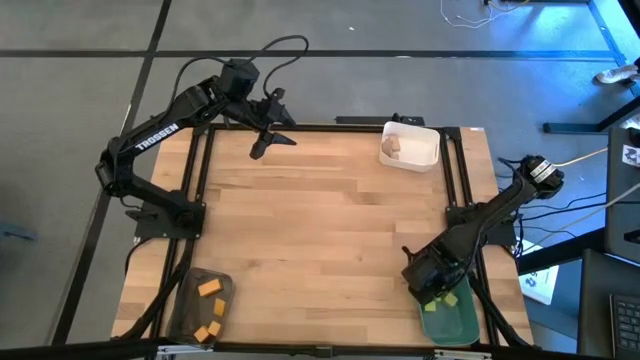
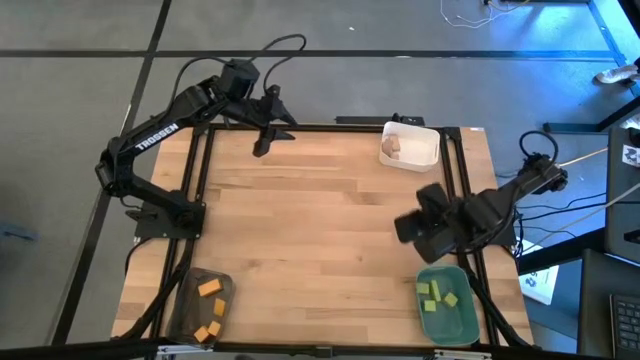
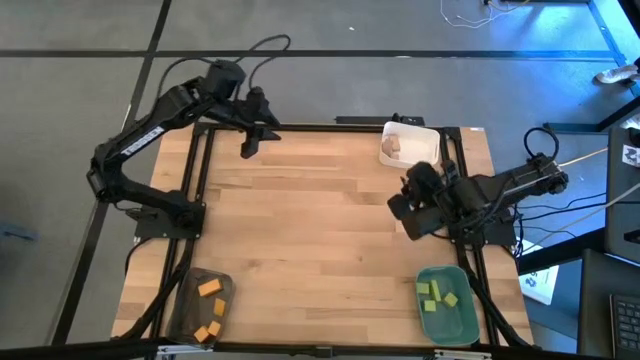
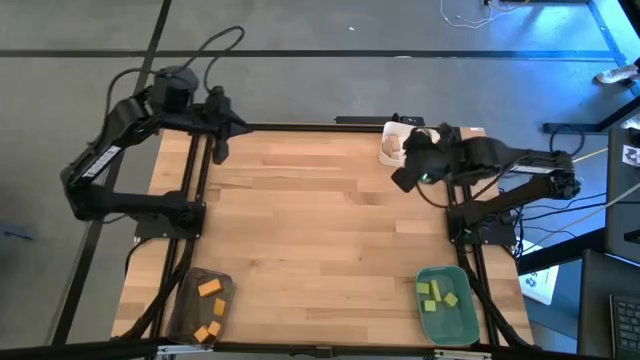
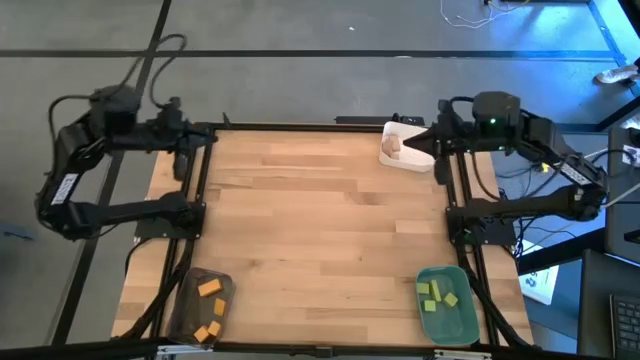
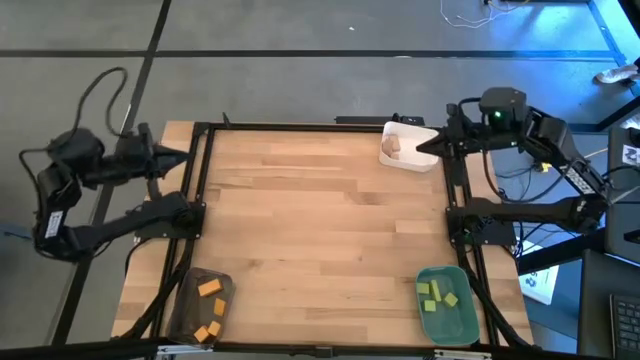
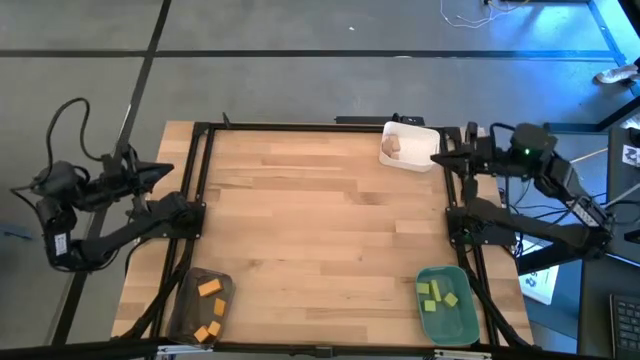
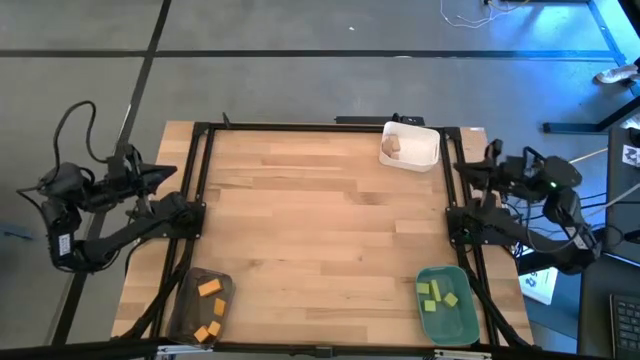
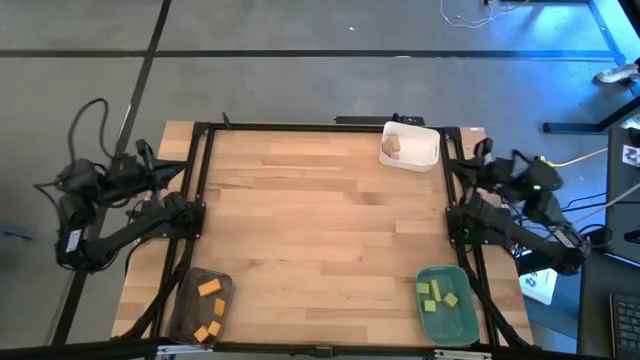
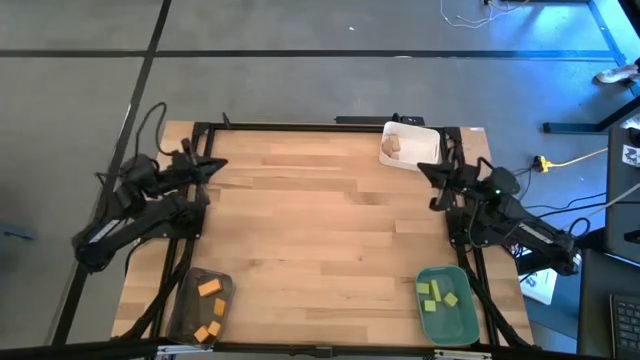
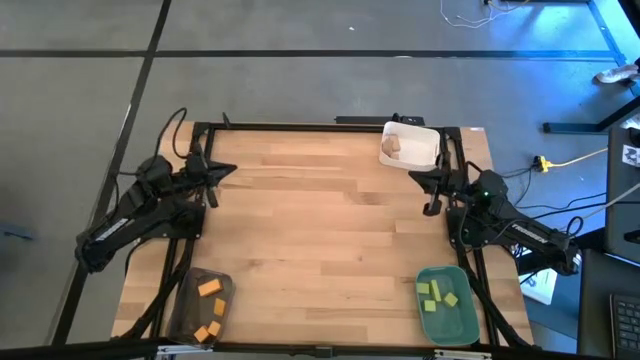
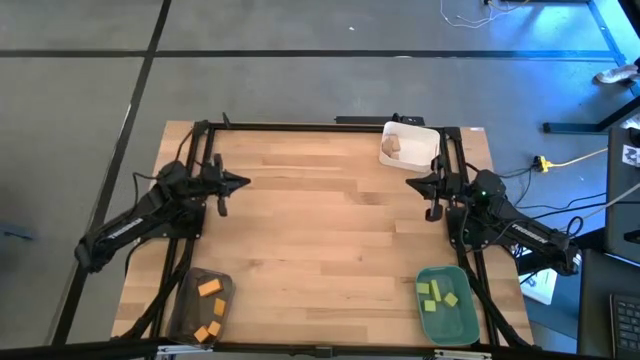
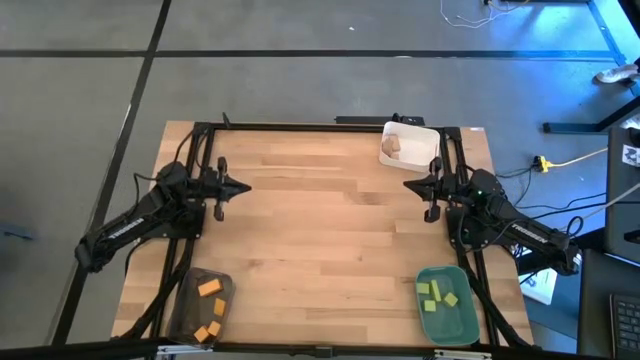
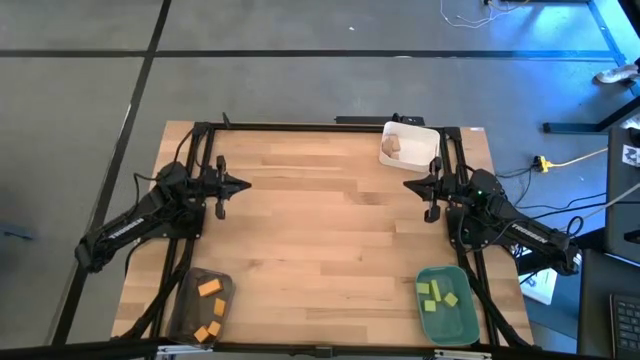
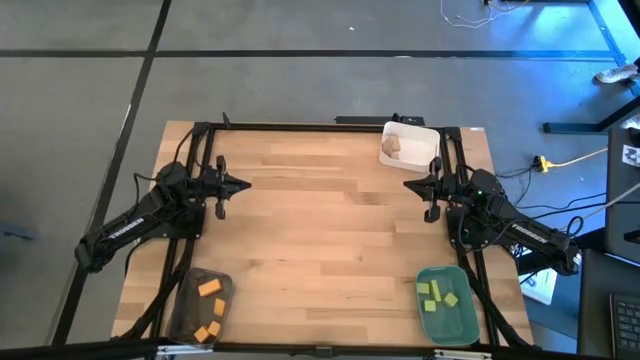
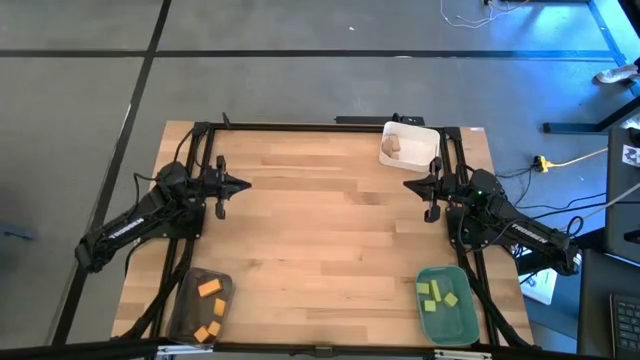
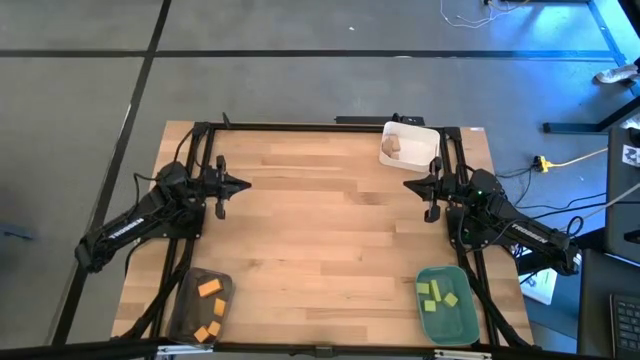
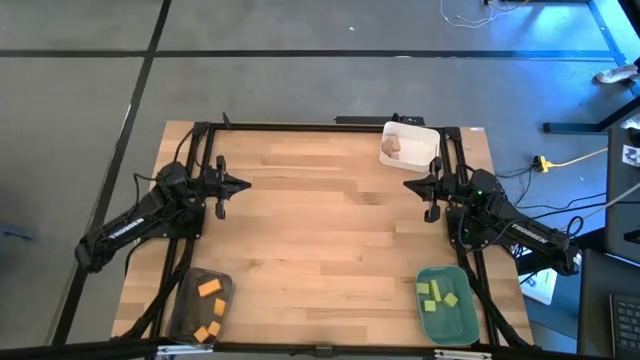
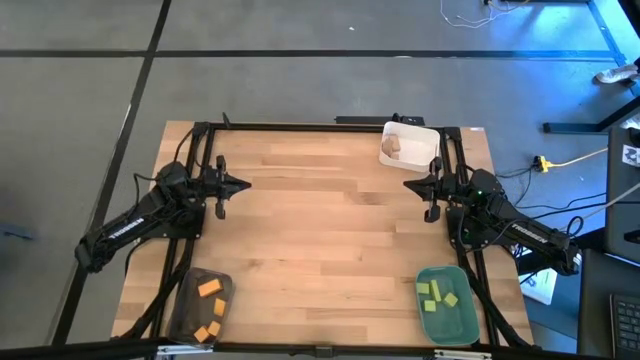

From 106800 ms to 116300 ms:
Task: Sort & place blocks by color
Return to Home Position

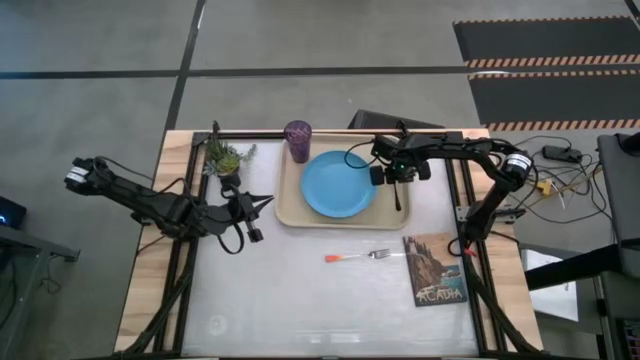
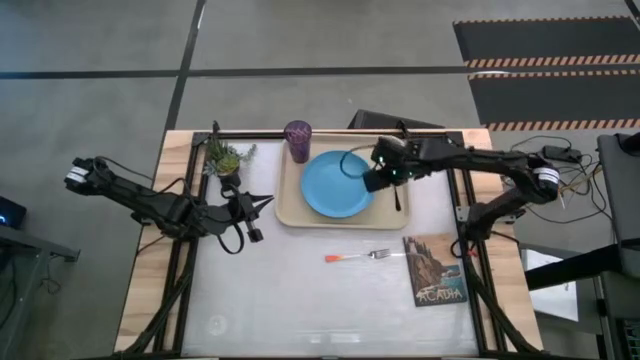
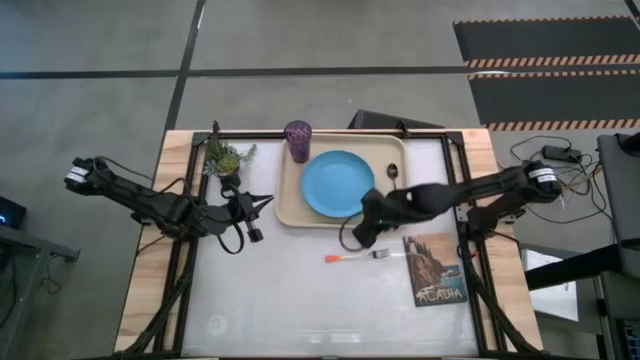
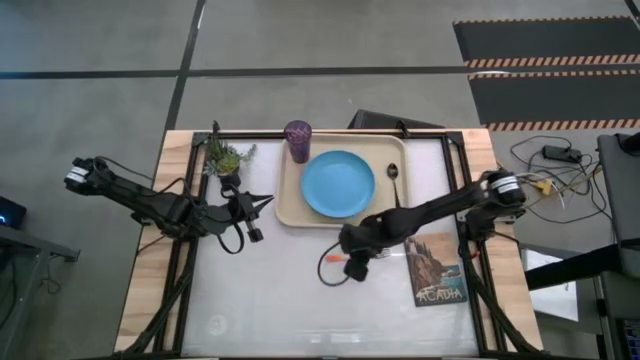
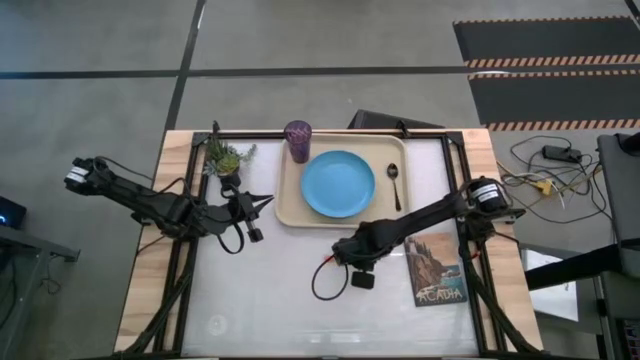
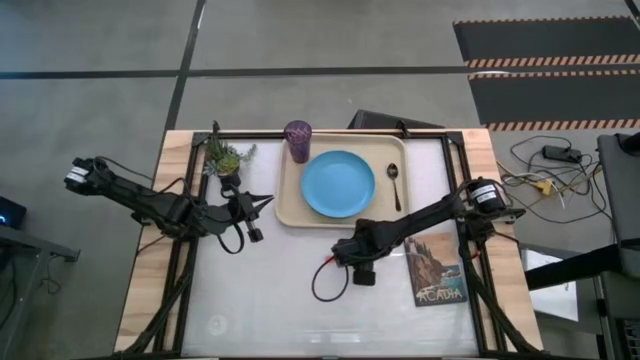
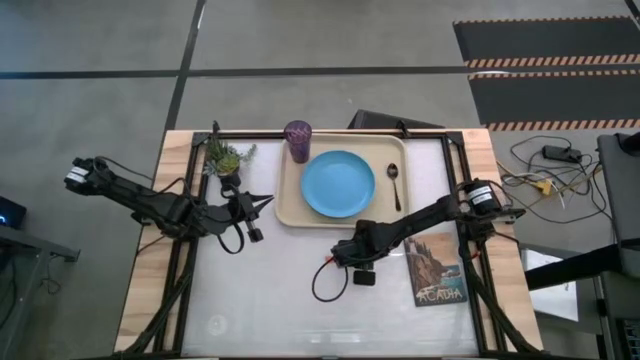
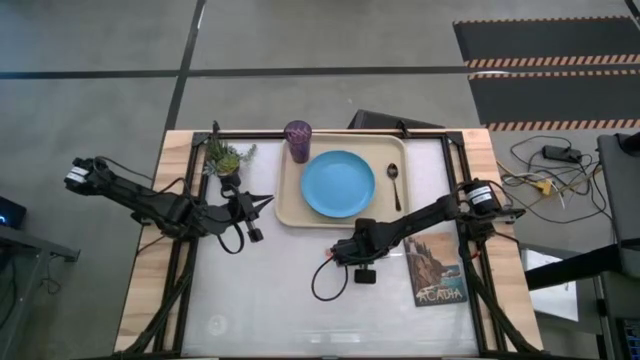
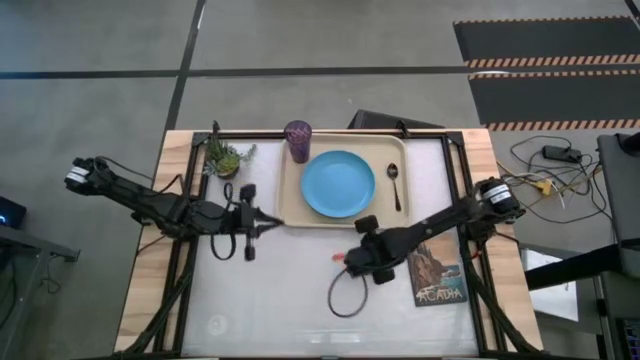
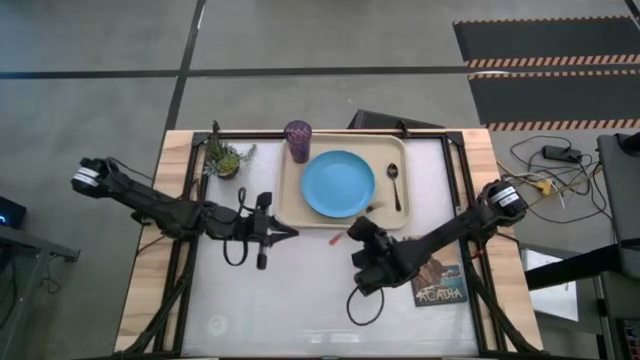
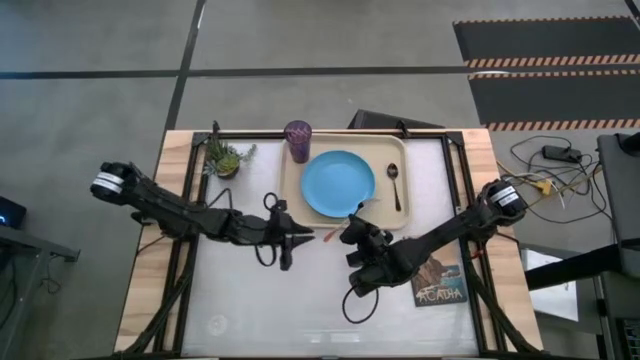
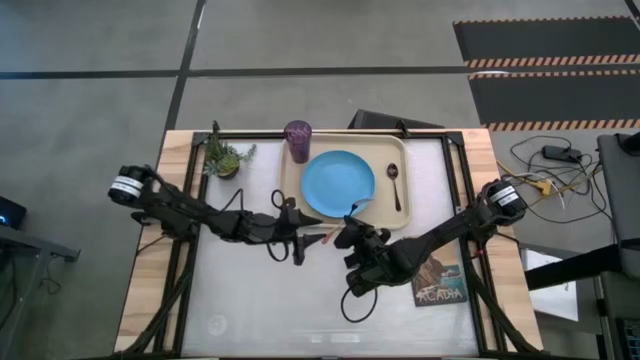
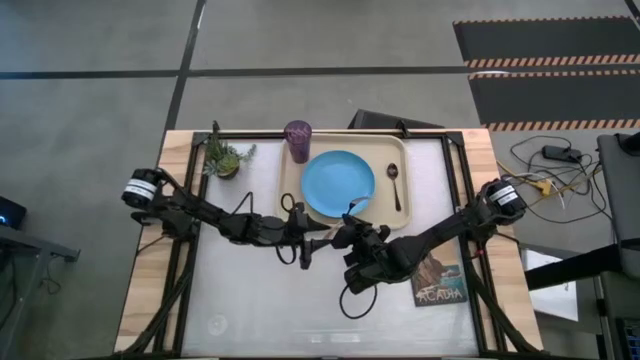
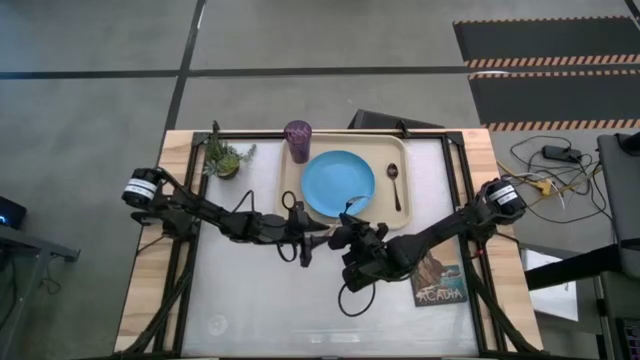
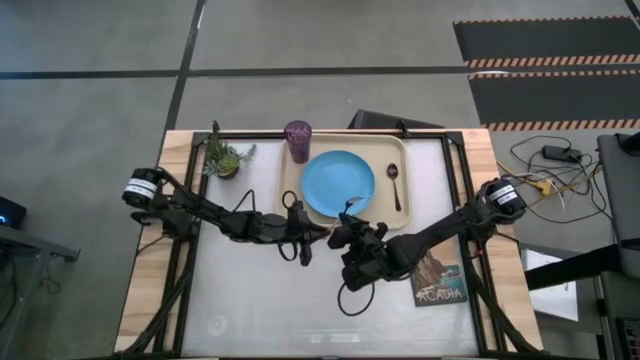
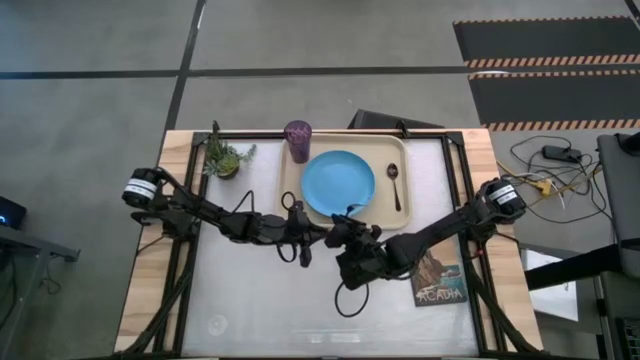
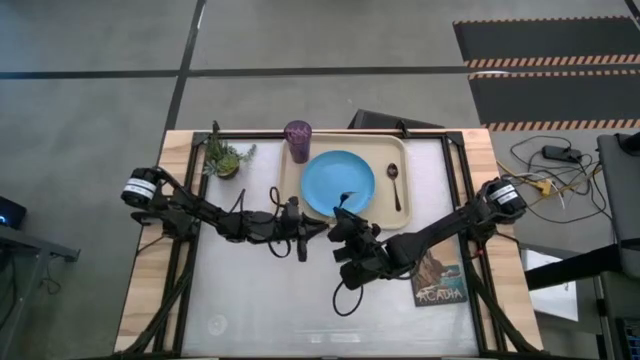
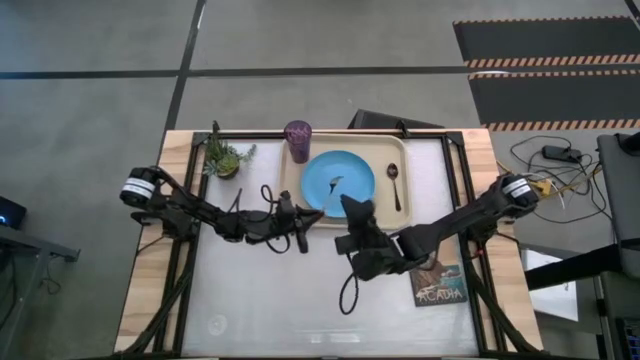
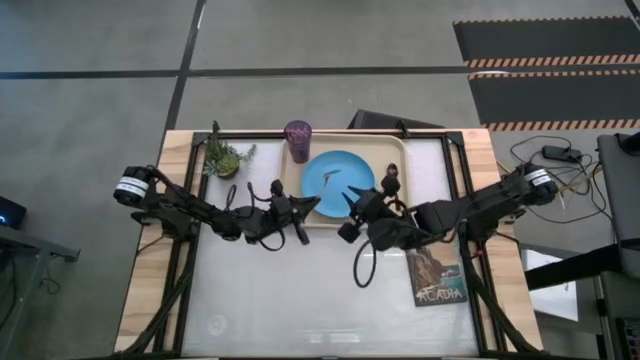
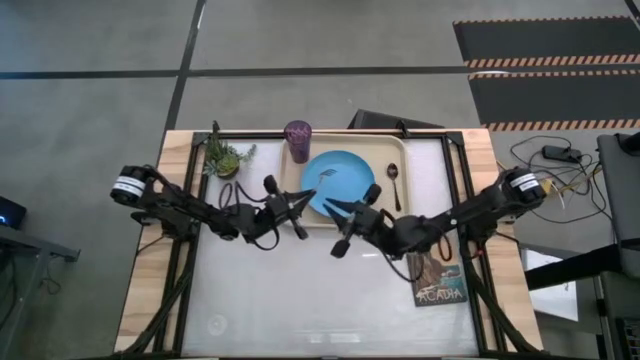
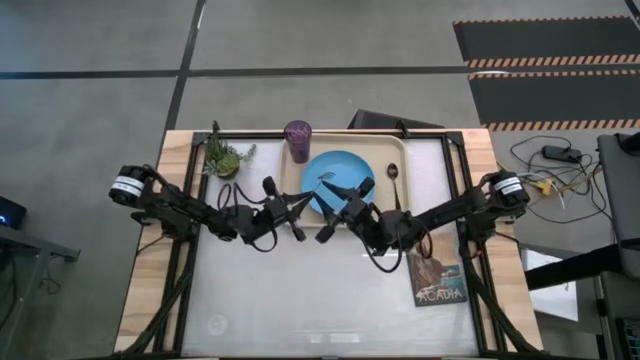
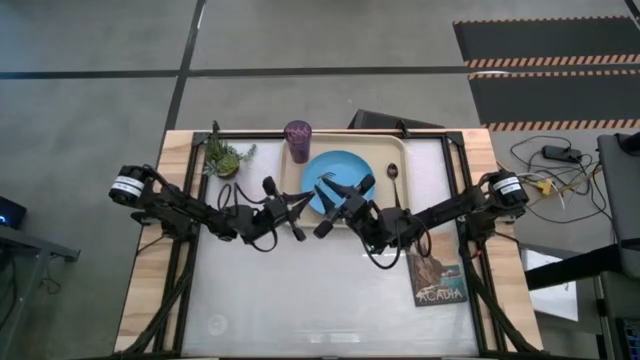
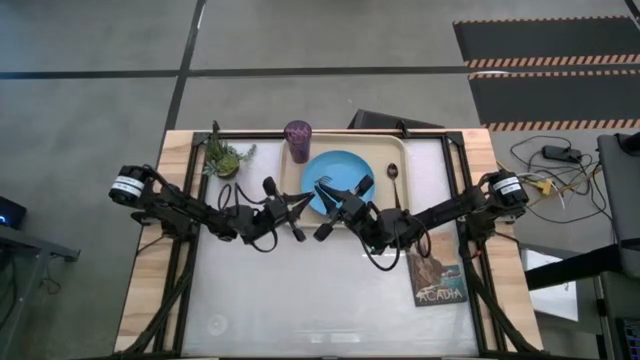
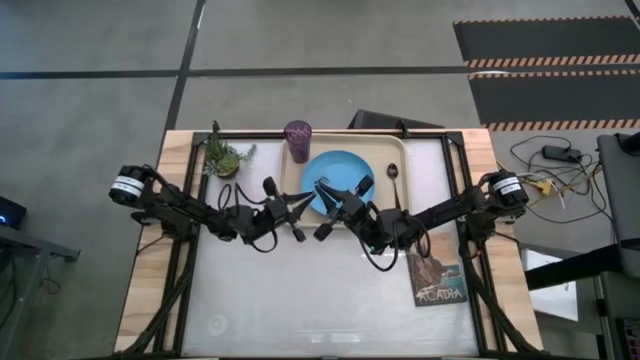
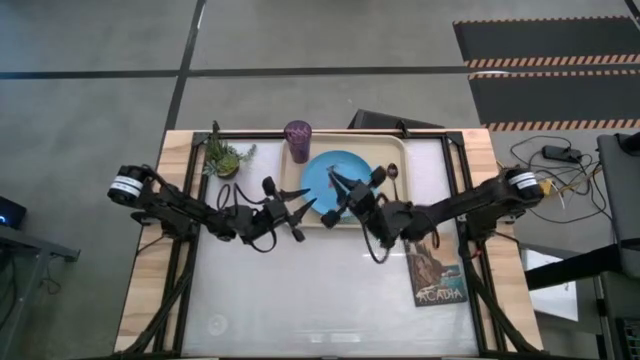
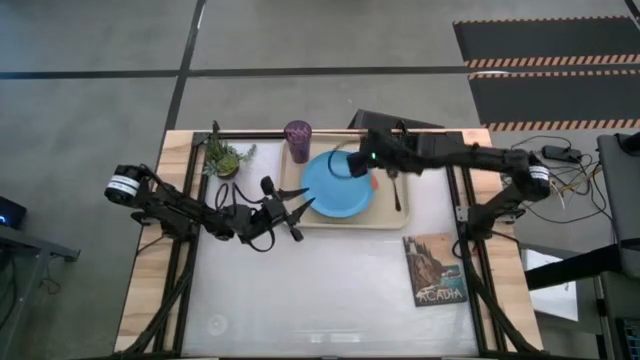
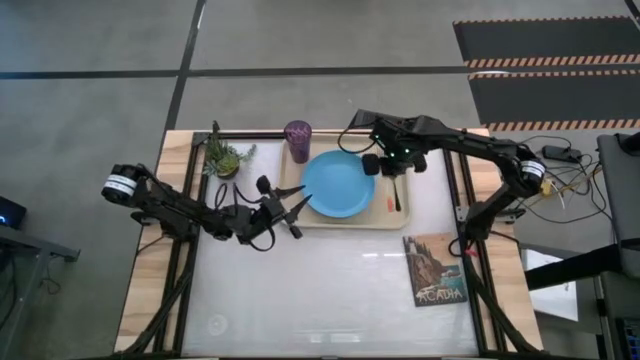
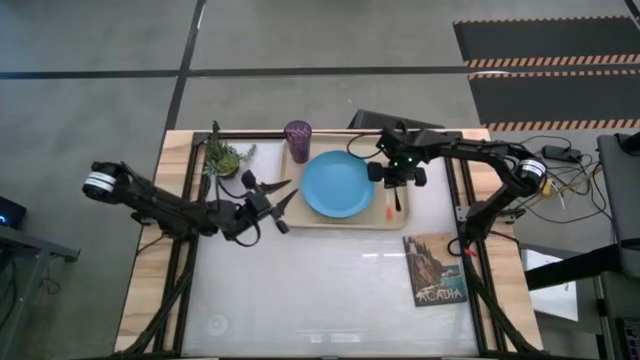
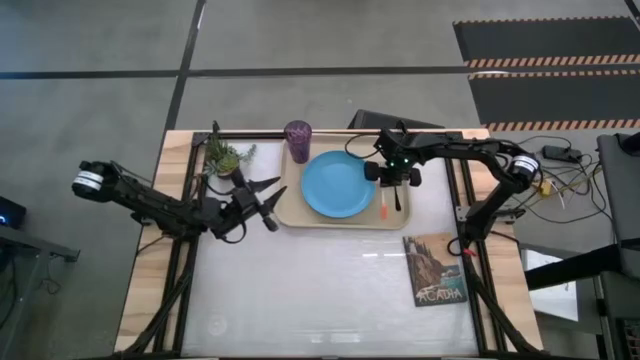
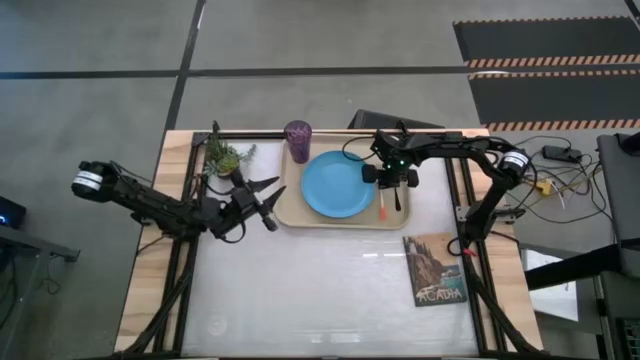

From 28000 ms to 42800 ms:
Task: Pick and place plate/cup/fork/spoon on tray
Put the orange fork on the white serving tray to the left of the black spoon
